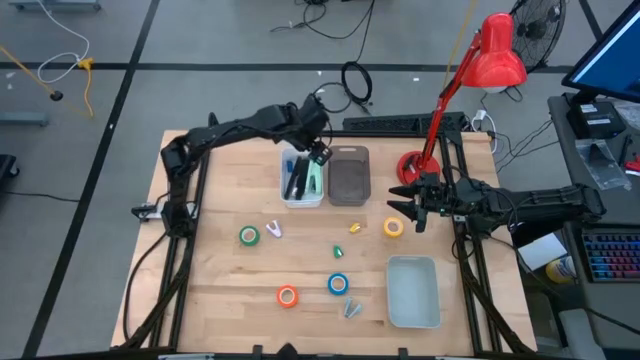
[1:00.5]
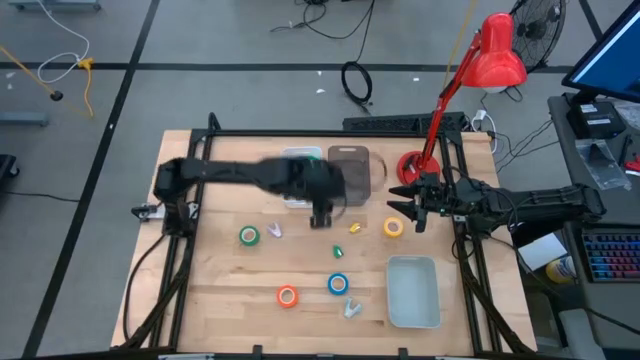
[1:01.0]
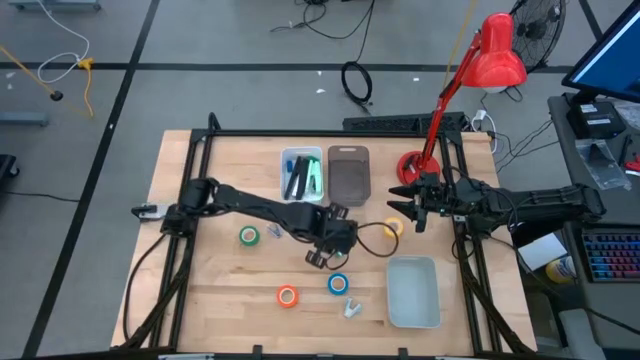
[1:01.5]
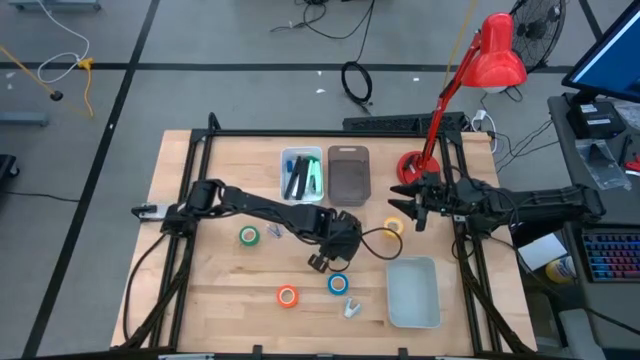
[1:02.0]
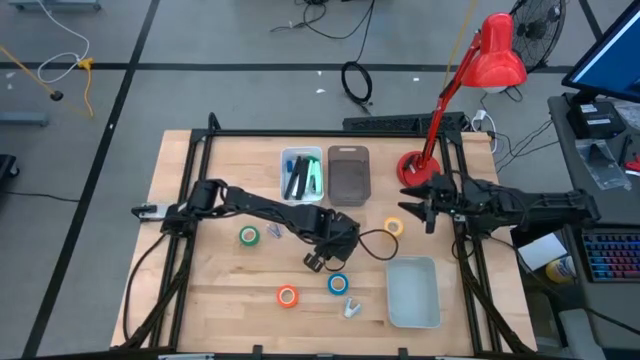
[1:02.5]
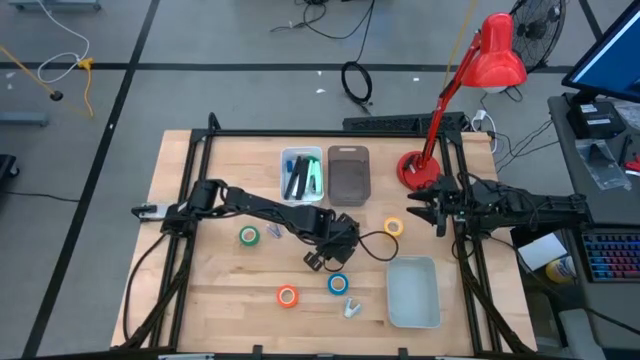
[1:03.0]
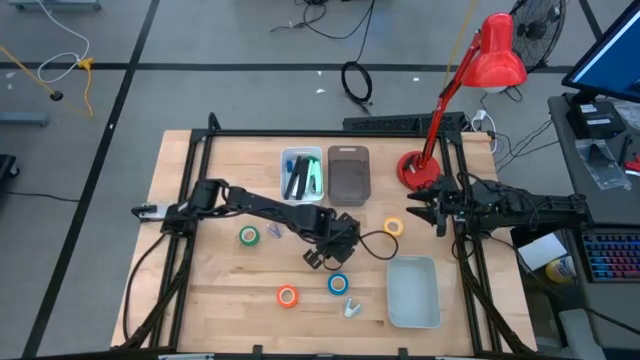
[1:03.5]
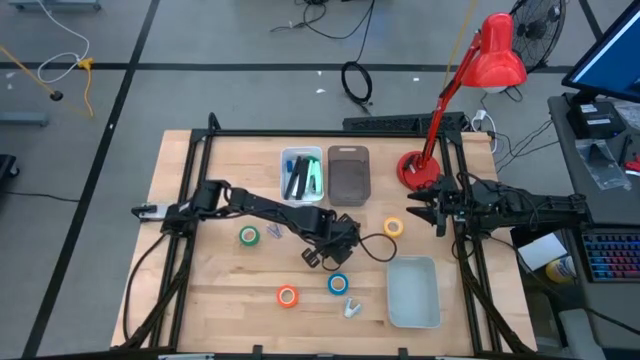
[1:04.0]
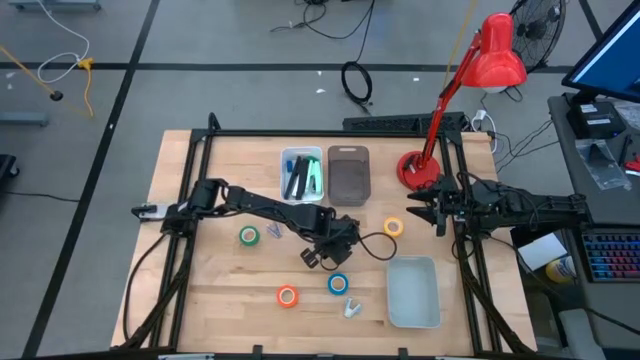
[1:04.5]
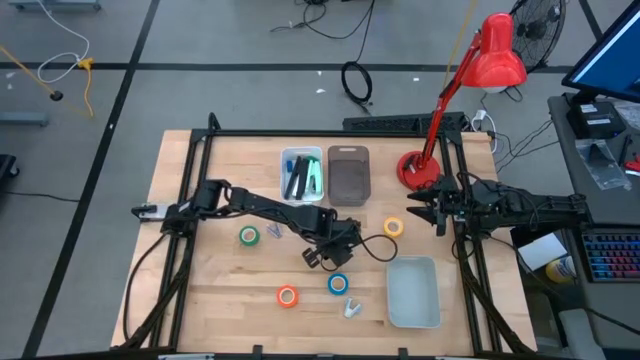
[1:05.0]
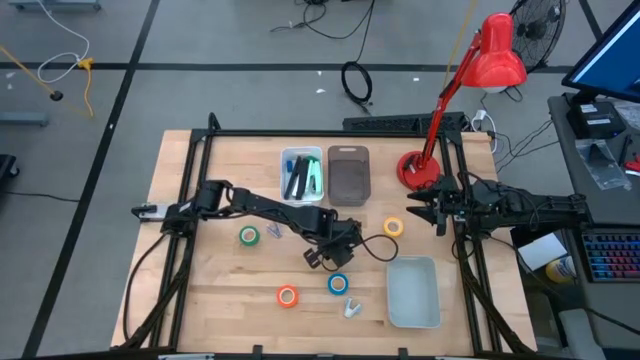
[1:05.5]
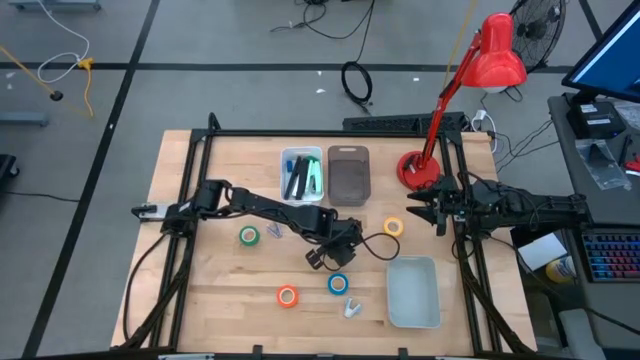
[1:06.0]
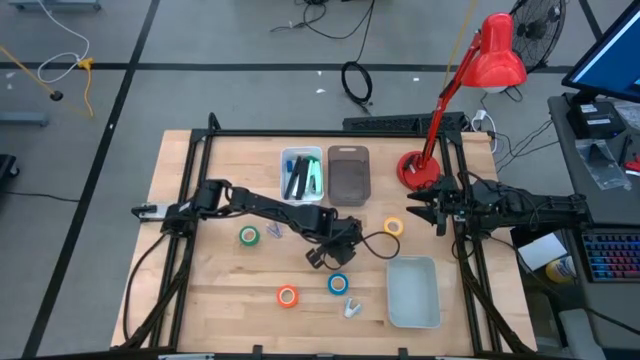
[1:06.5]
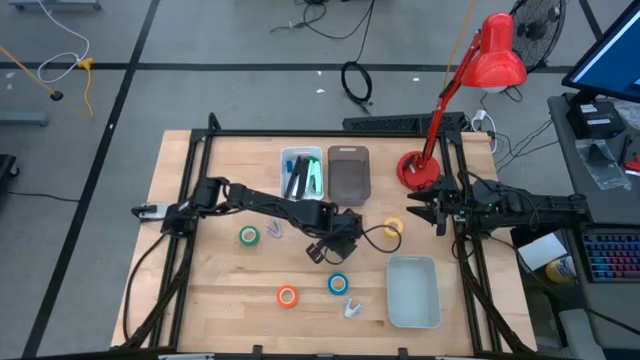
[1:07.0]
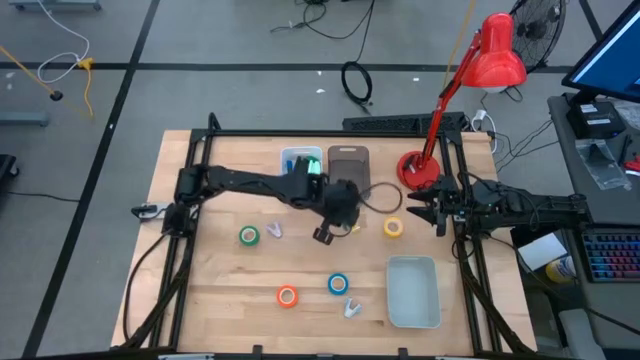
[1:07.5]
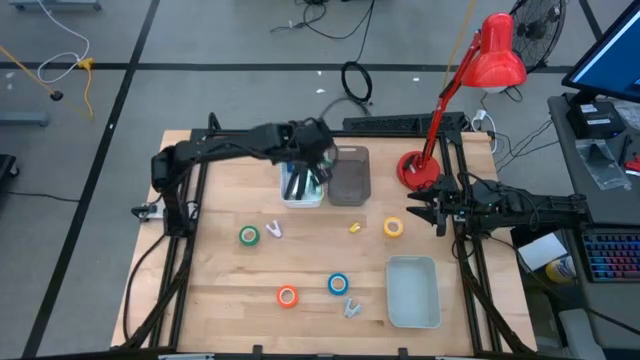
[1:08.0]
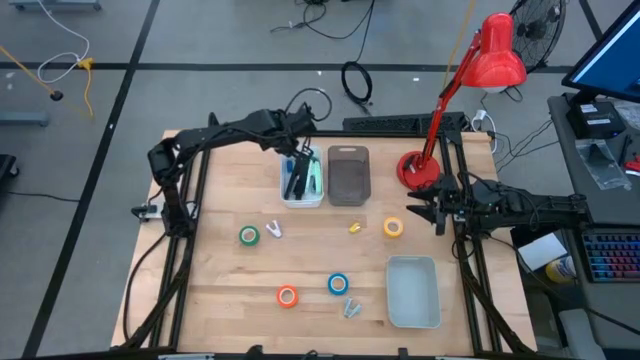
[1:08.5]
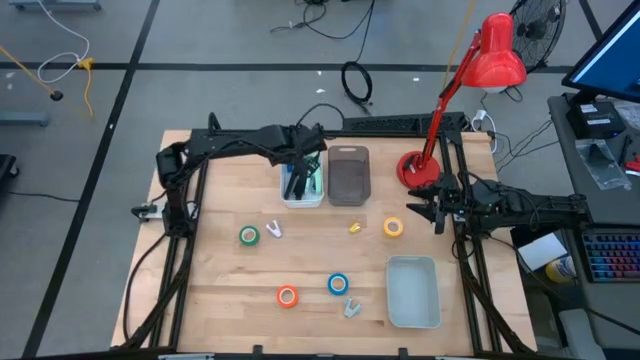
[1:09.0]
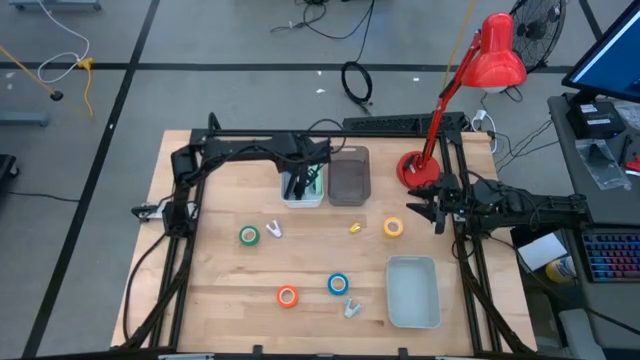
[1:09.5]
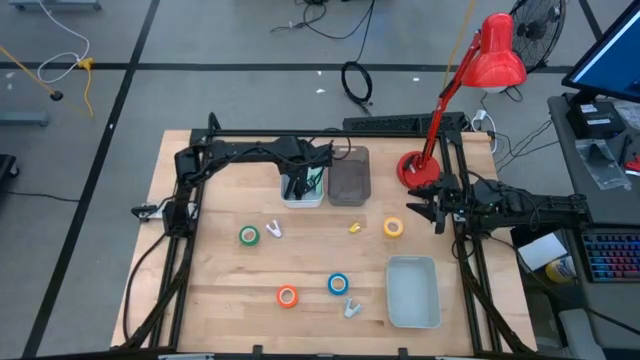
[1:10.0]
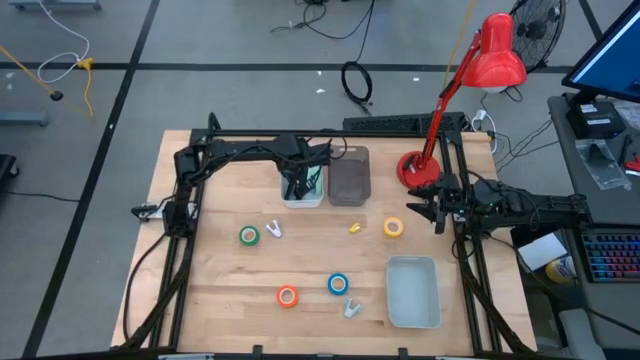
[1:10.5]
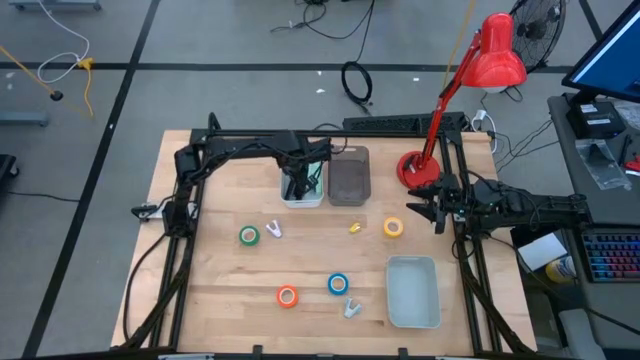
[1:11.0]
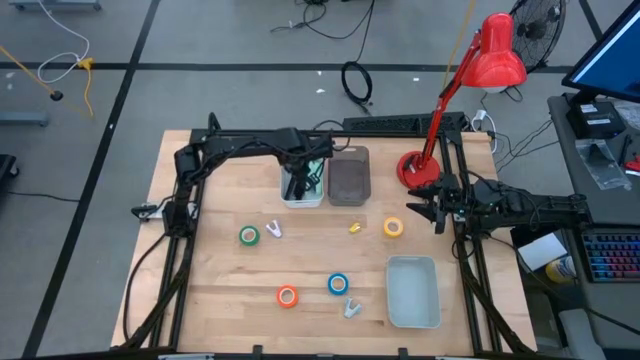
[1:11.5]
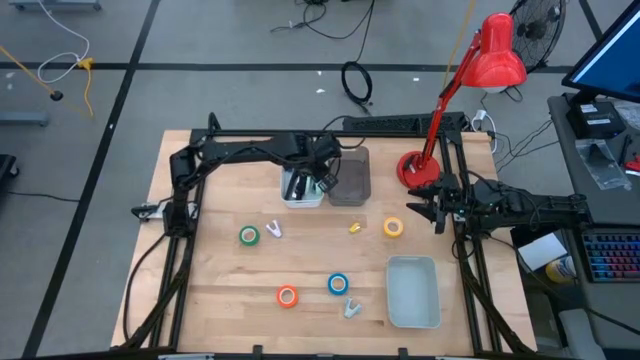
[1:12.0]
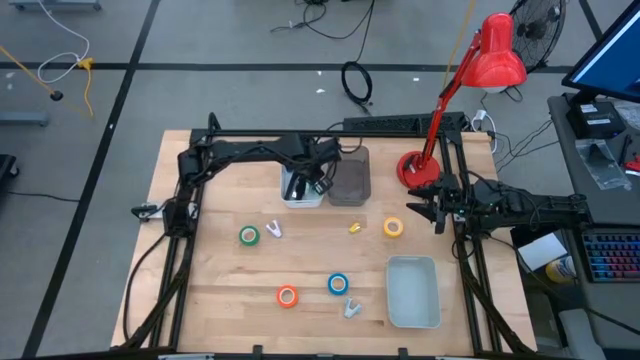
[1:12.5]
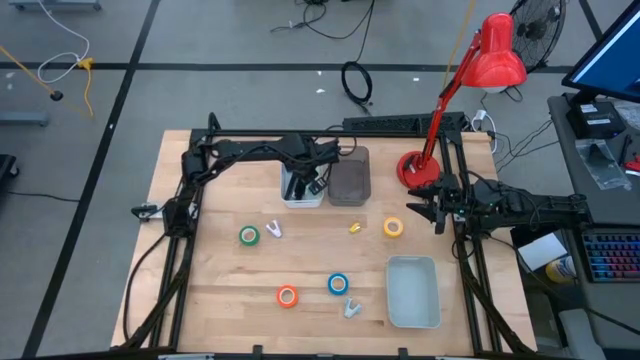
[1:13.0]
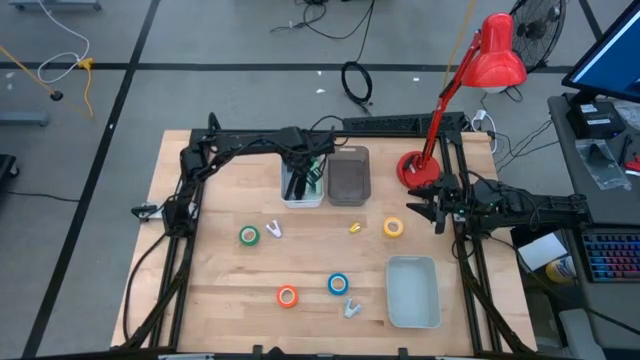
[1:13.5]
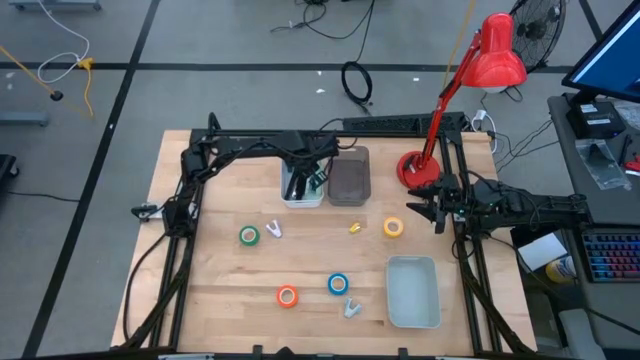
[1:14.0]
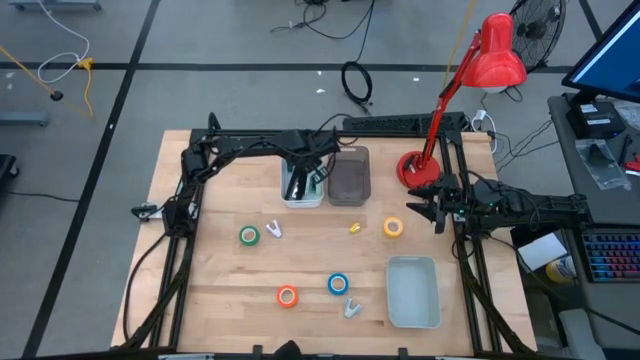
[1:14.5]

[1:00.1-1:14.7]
Task: Pick and place Stapler, Stapler remover, tape
Put the green stapler into the white bin

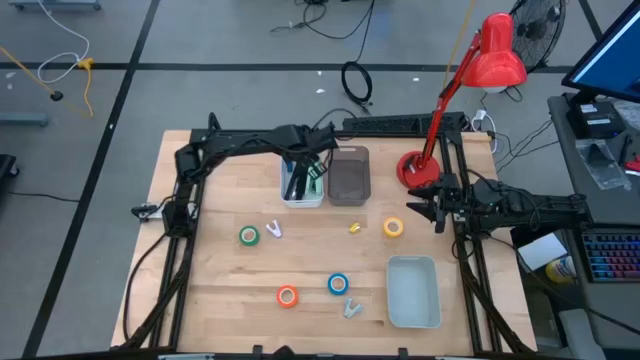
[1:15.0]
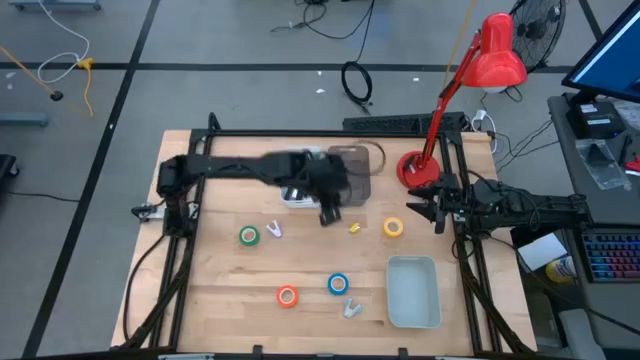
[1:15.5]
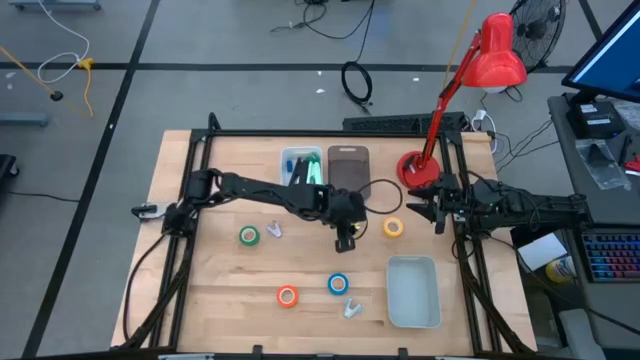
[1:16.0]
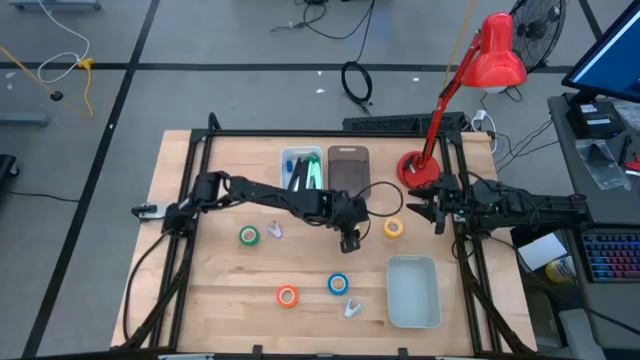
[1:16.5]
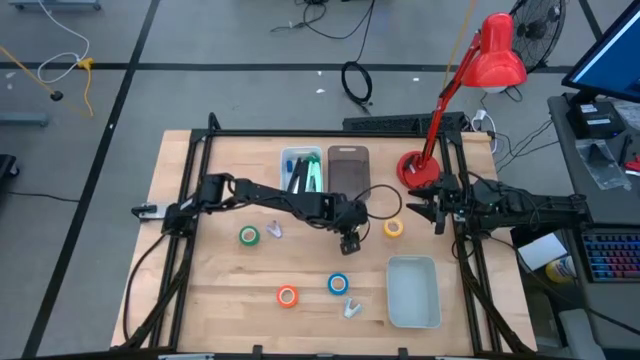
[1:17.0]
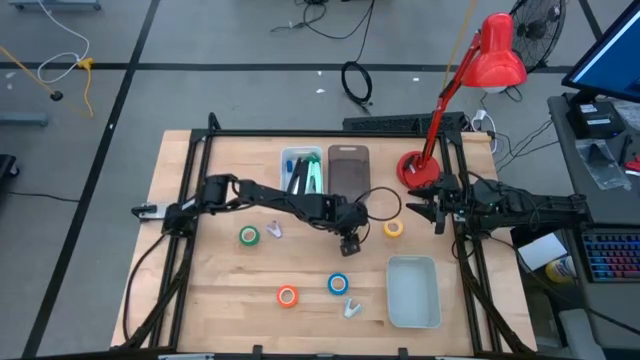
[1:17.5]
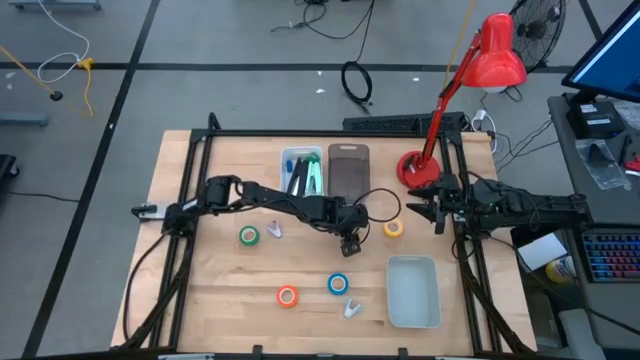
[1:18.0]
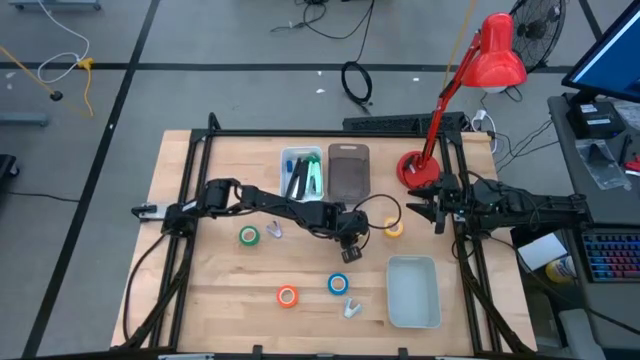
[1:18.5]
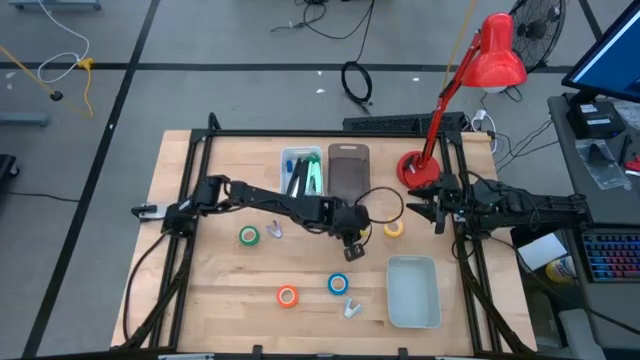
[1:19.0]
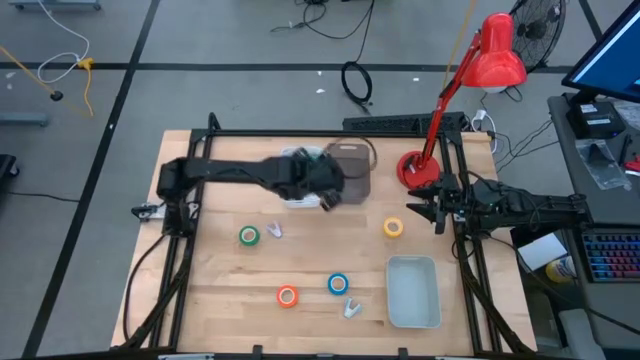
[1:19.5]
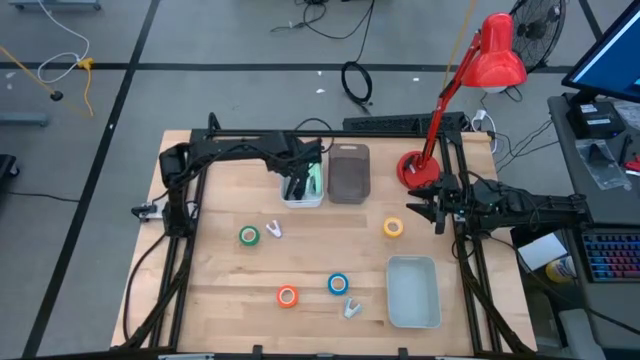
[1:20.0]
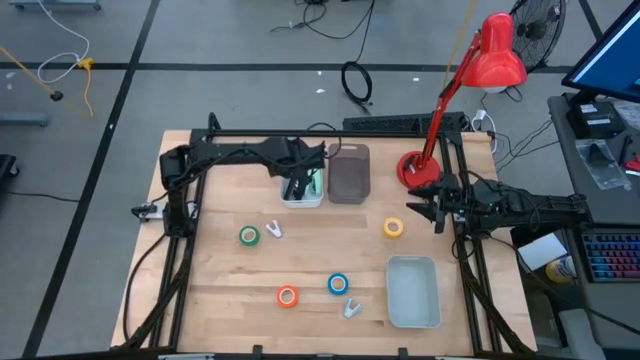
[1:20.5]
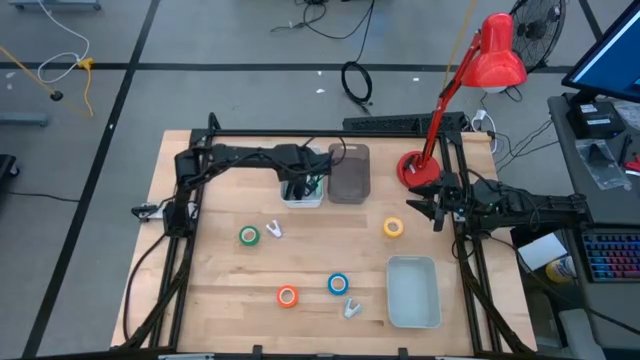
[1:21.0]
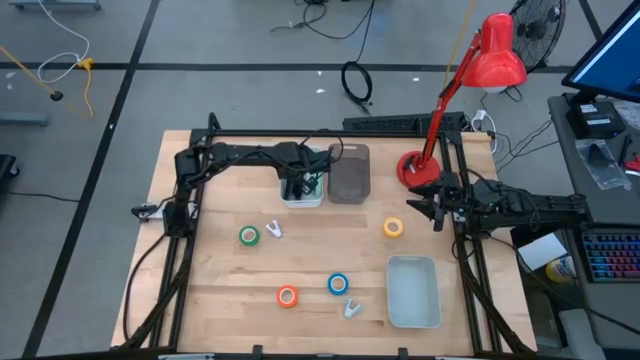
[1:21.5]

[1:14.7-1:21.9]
Put the yellow stapler into the white bin
